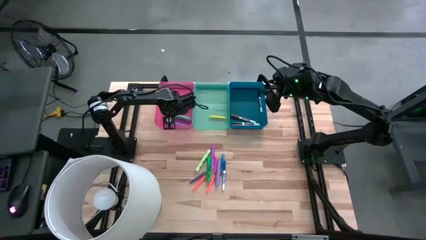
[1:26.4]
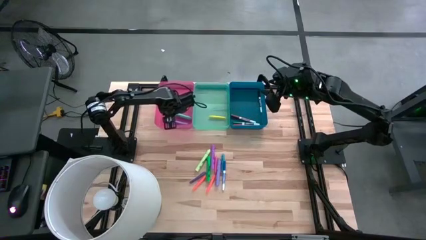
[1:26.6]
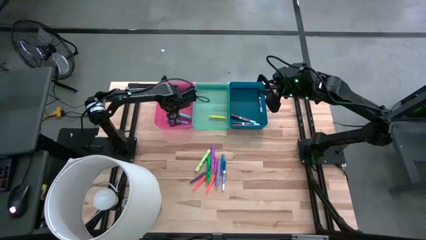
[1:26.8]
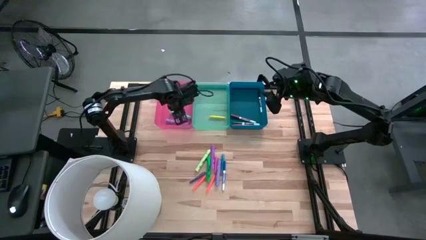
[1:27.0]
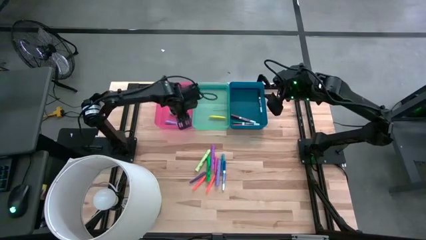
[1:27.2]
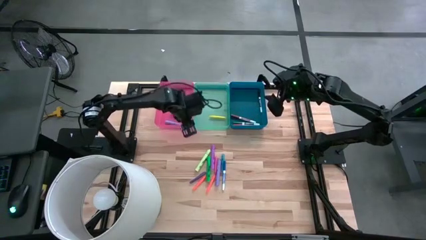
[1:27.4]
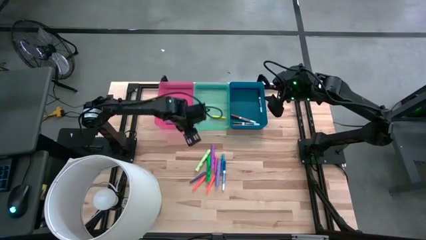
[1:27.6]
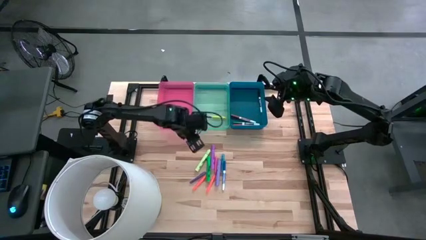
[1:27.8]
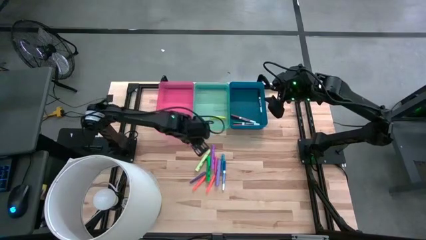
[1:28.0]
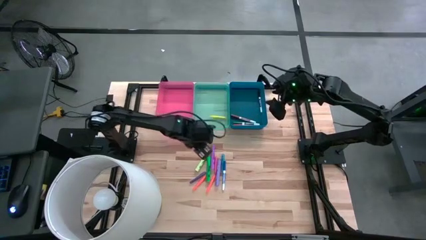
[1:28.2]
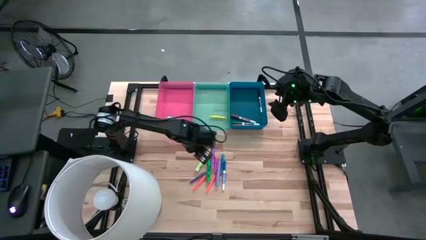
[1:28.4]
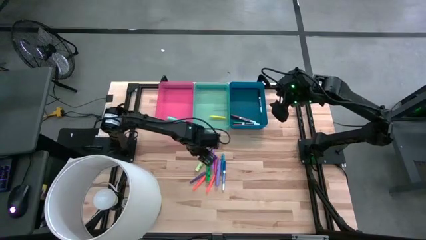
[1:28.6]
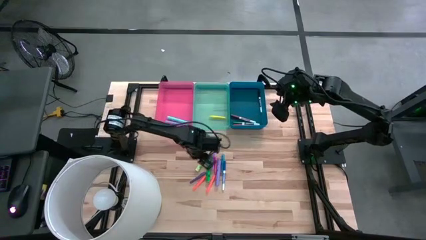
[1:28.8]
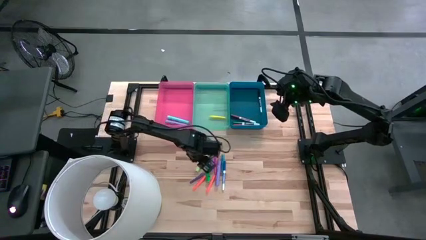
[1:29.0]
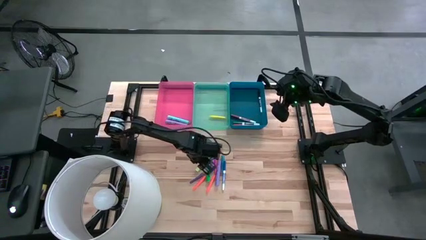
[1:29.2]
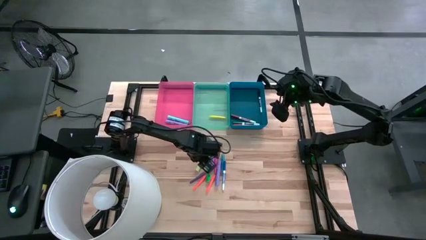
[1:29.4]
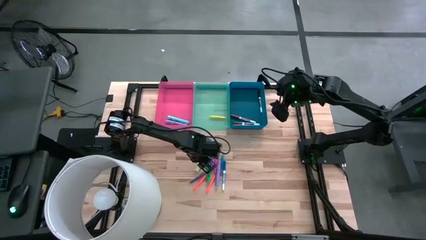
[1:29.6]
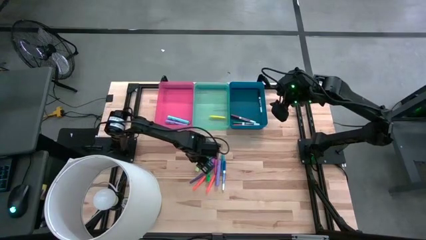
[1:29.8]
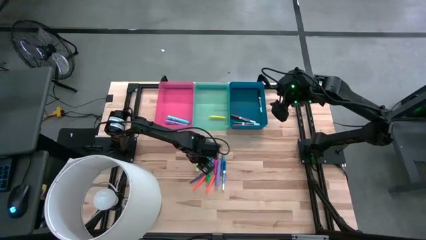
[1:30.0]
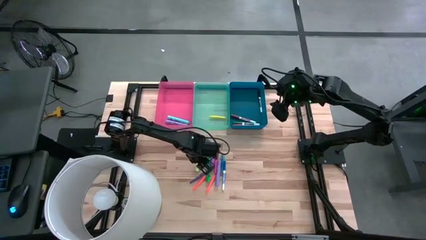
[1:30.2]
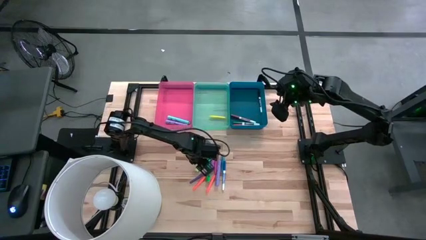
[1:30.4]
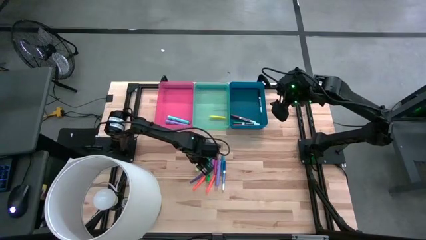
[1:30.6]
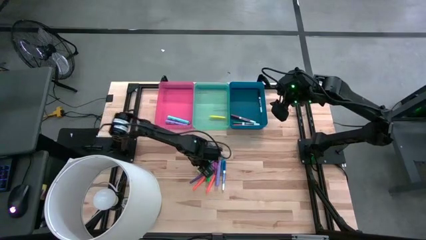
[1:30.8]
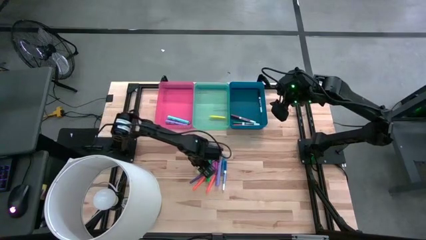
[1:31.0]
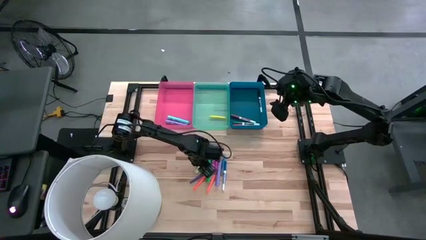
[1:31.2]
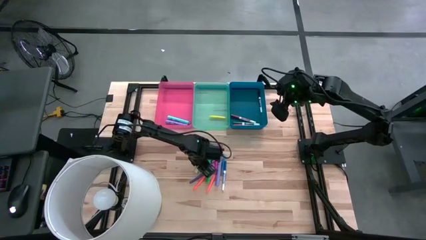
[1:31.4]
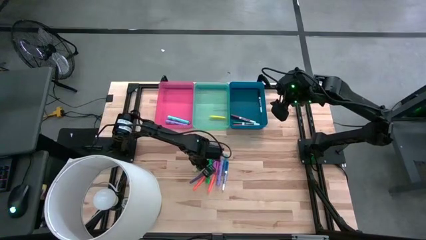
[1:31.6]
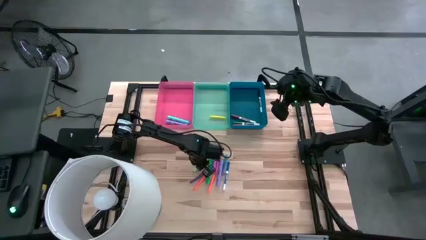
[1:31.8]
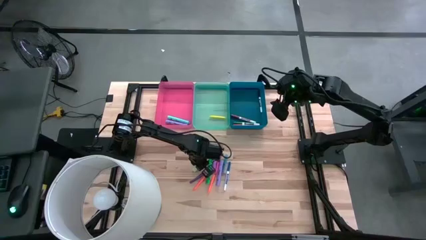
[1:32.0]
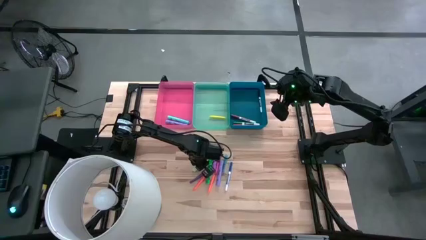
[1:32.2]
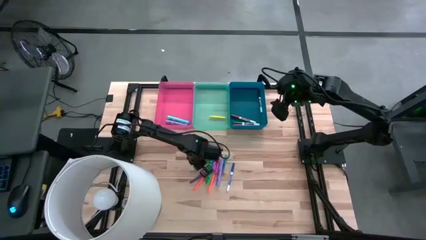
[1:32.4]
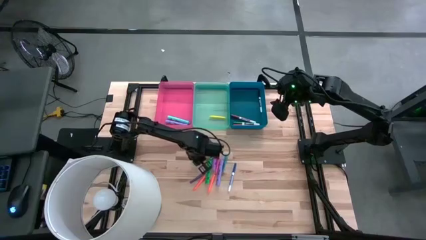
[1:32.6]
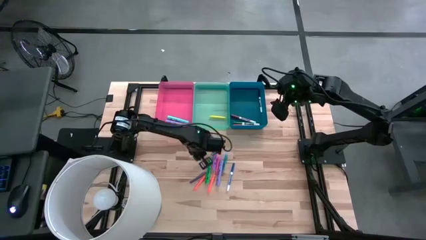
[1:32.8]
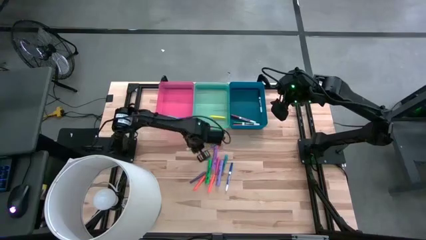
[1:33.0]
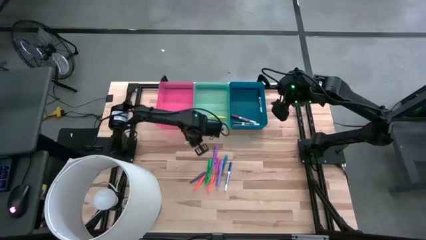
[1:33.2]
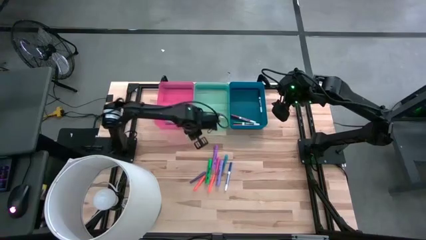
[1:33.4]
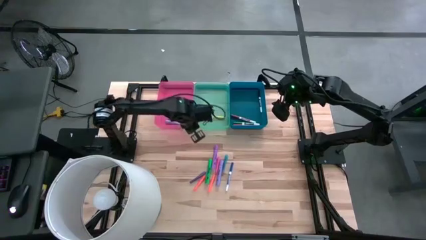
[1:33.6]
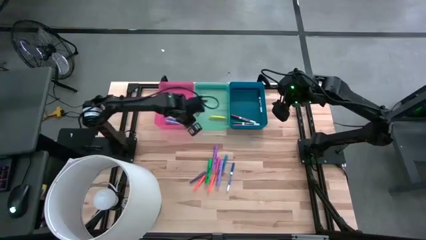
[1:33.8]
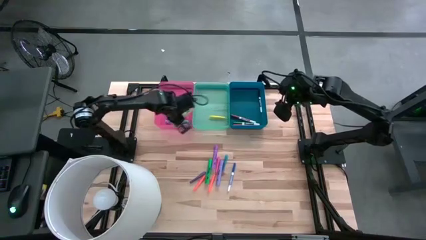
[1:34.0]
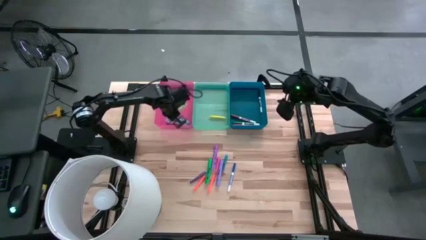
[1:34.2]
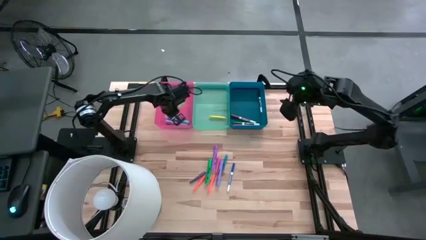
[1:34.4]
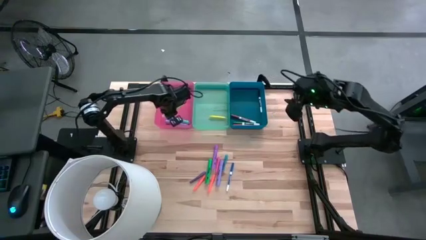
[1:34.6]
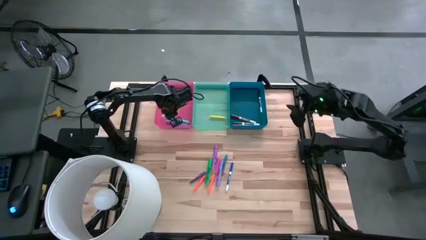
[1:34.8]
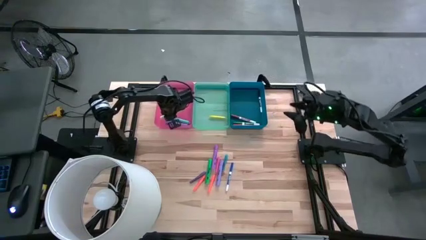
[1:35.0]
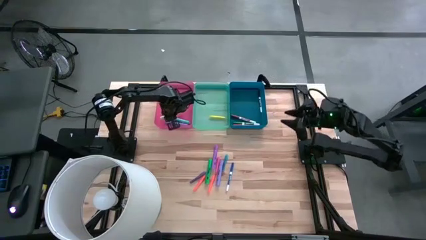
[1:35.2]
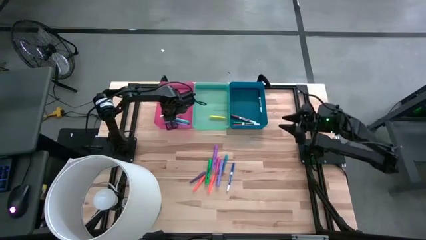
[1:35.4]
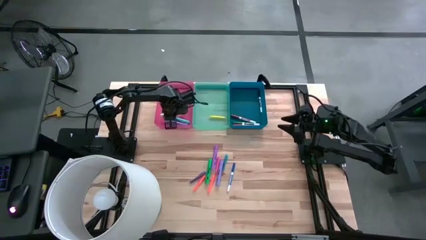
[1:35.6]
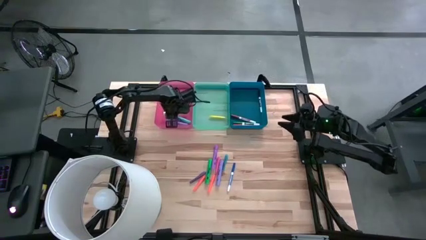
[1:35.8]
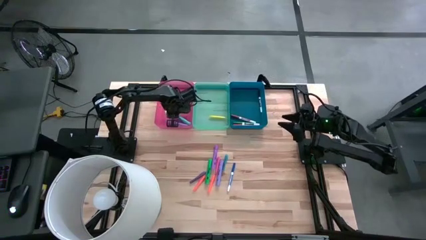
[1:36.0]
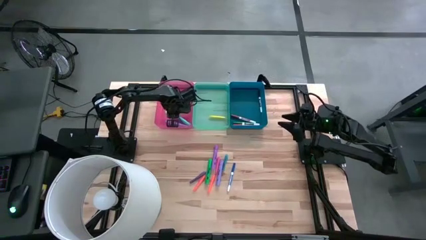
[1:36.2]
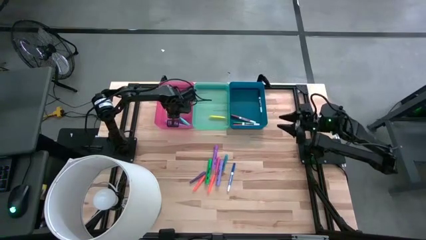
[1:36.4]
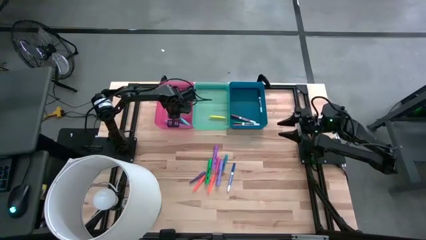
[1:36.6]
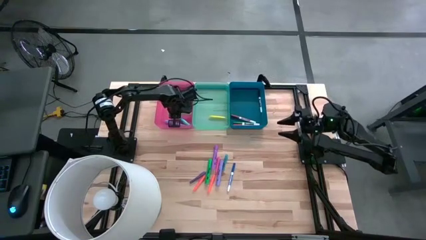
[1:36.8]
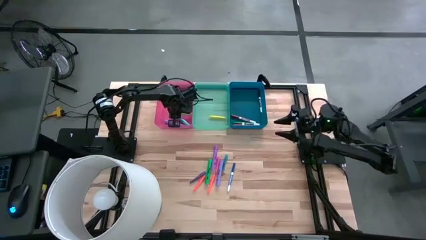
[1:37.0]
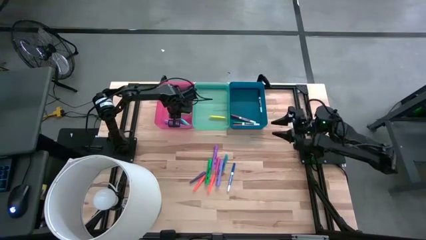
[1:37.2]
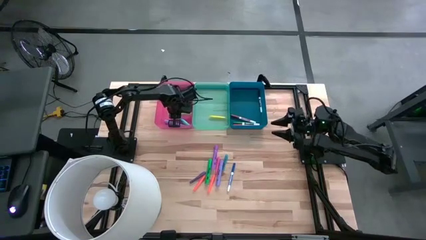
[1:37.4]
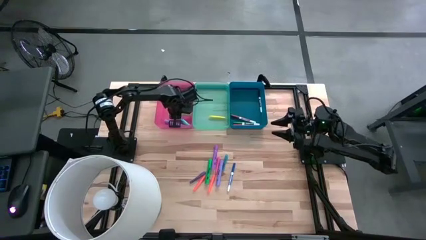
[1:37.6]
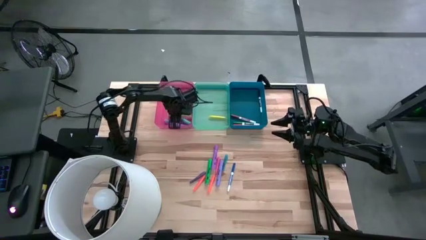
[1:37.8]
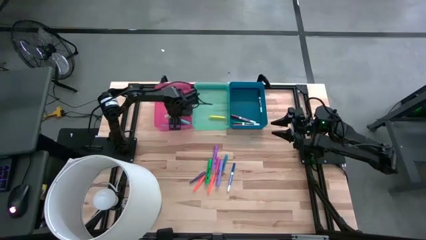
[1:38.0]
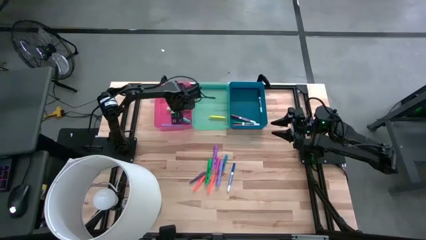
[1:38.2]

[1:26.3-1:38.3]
Task: Pick & Place Markers
Put the light green marker into the red bin

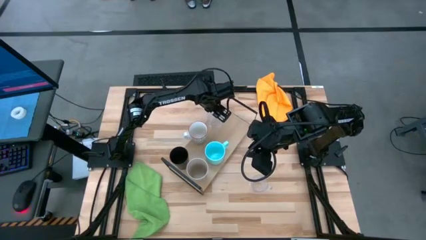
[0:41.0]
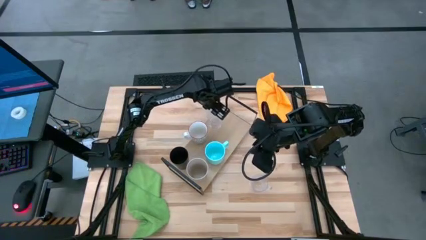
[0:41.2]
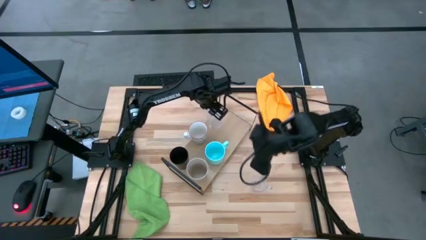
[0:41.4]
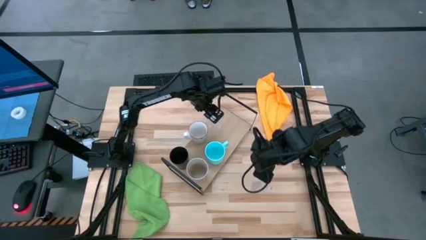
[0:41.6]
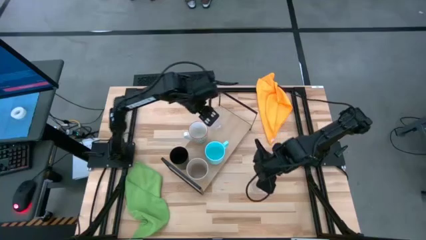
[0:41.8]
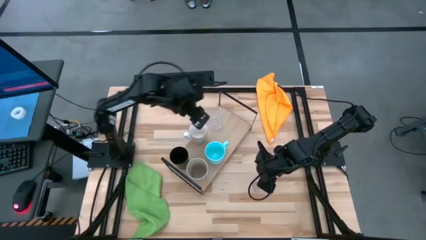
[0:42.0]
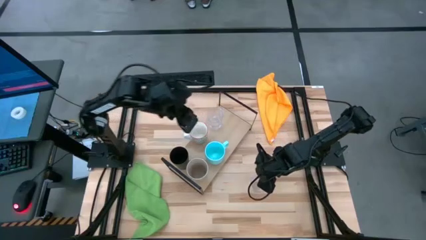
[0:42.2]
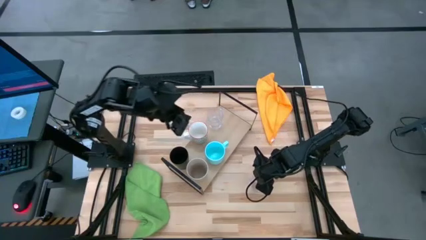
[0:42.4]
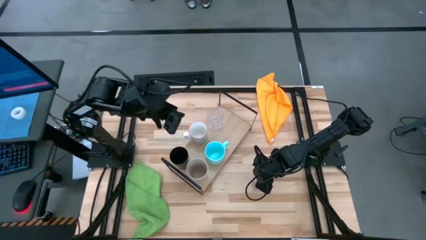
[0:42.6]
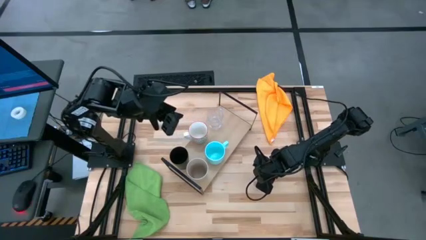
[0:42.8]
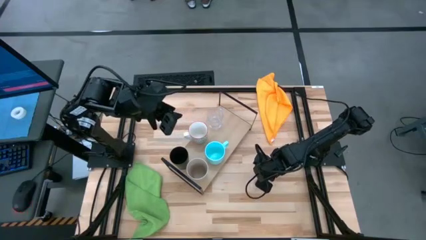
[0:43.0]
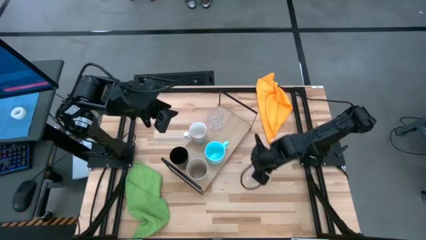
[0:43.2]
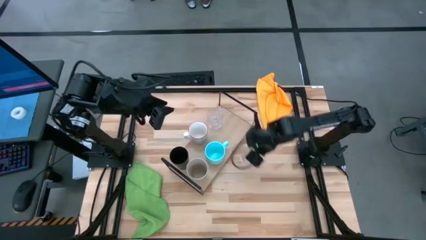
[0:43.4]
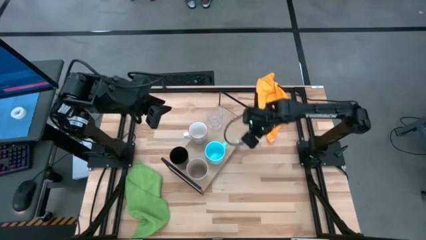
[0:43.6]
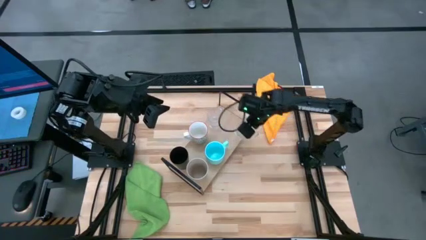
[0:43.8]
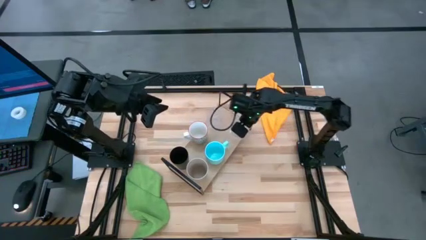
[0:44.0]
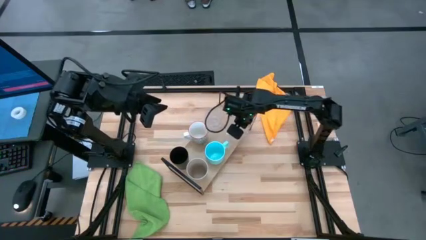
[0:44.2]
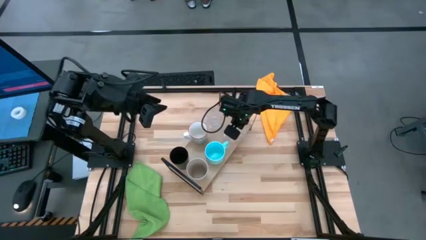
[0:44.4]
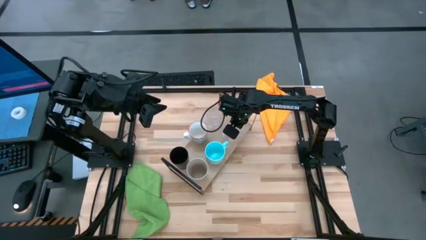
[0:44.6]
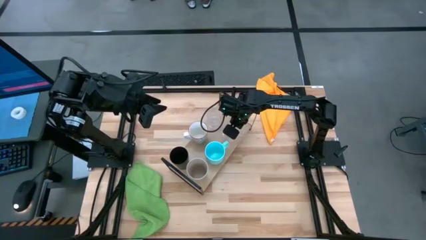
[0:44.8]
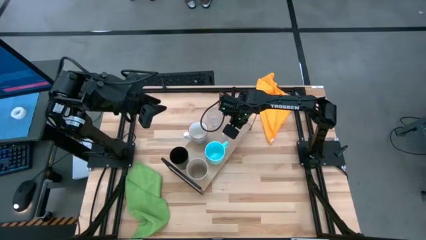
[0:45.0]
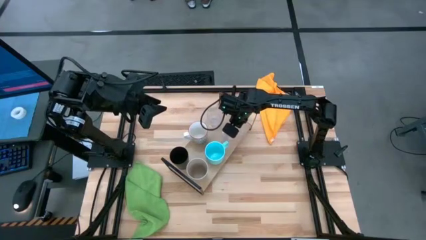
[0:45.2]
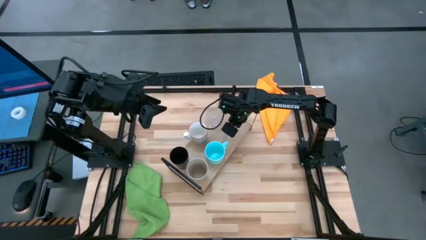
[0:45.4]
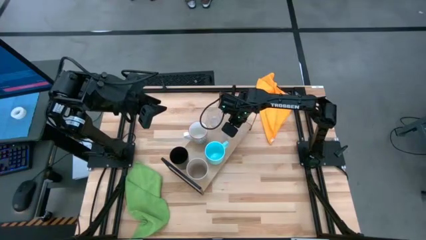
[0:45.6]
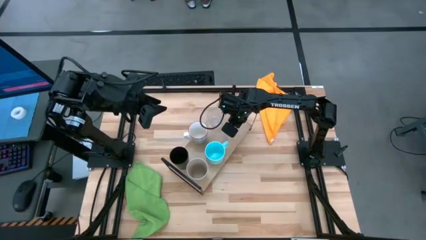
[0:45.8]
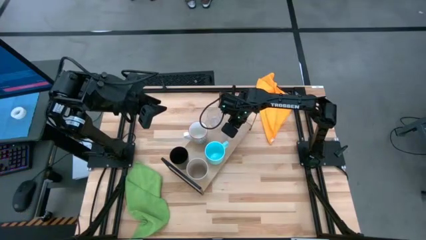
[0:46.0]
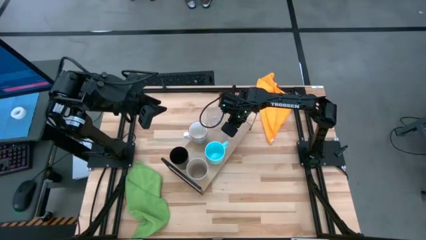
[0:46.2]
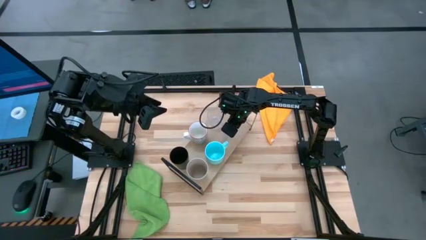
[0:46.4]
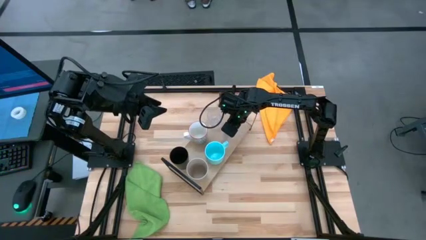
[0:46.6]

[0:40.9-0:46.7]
Task: Stack small to large cups/mugs on shelf
Put the transparent cup on the shelf aligned with the blue cup
